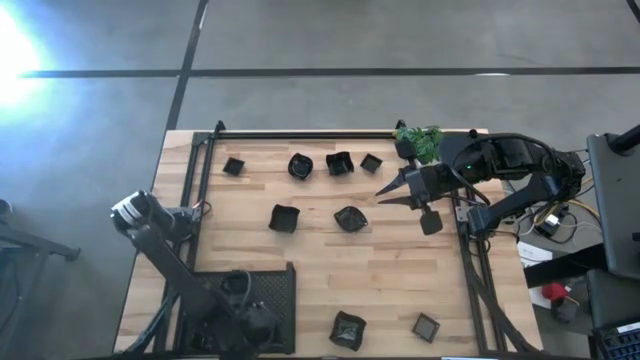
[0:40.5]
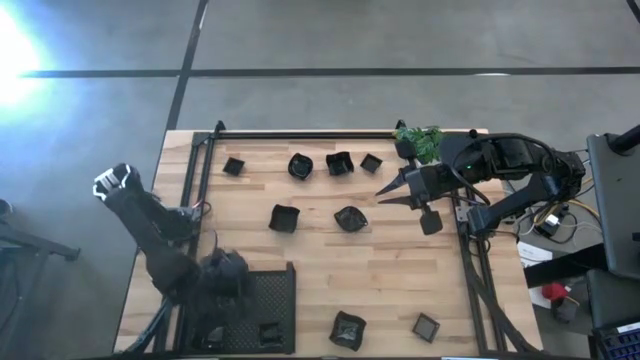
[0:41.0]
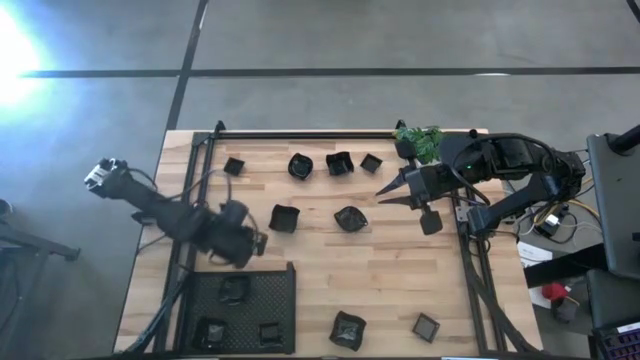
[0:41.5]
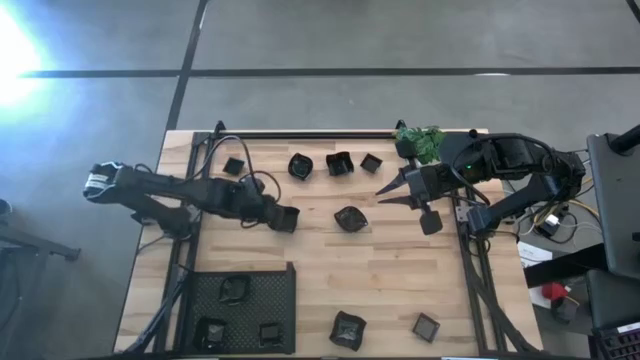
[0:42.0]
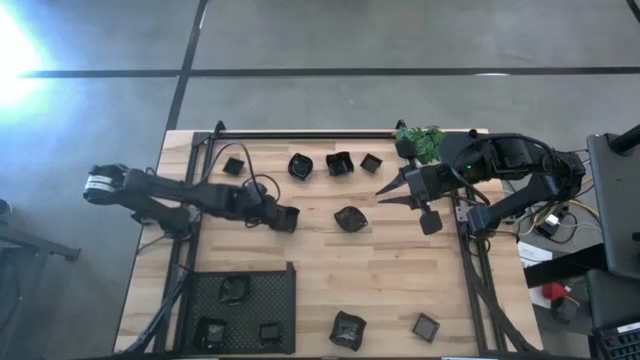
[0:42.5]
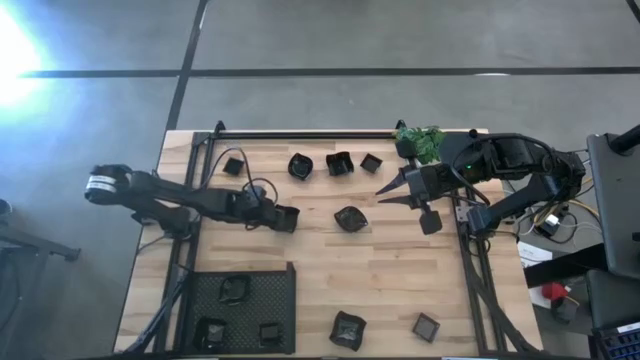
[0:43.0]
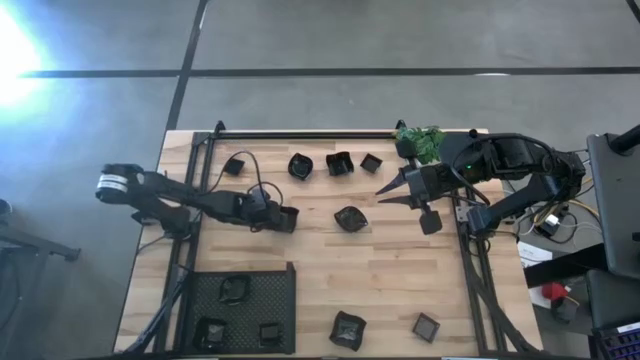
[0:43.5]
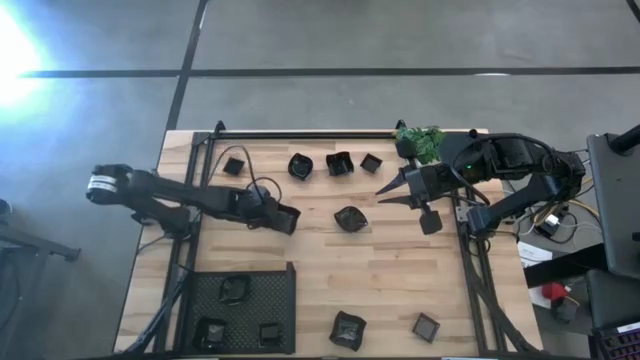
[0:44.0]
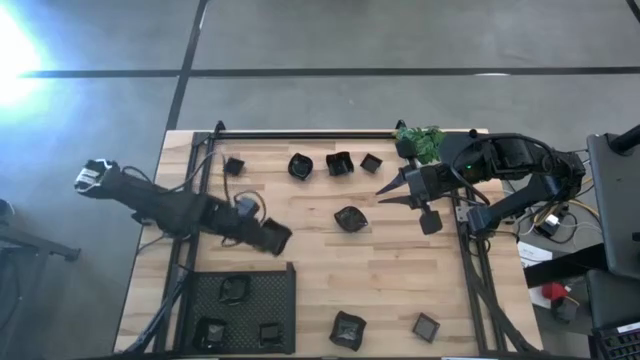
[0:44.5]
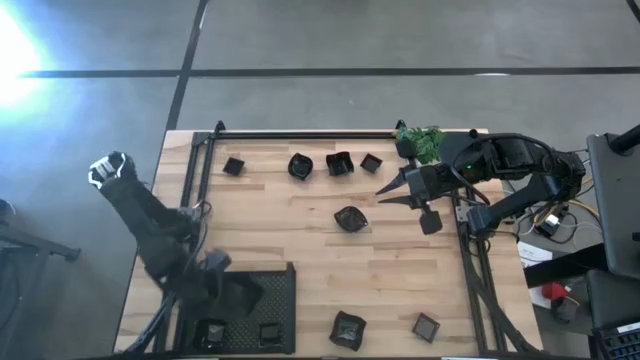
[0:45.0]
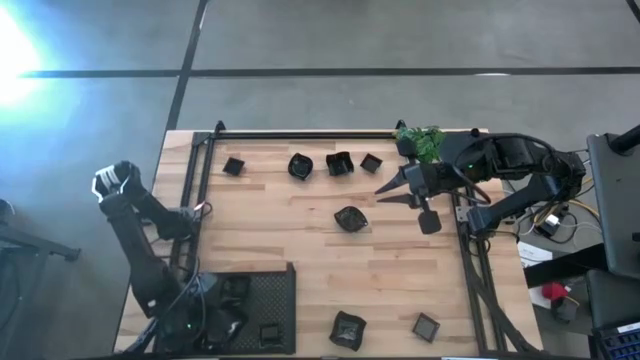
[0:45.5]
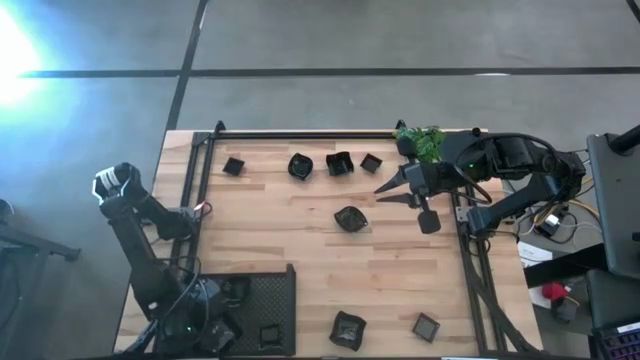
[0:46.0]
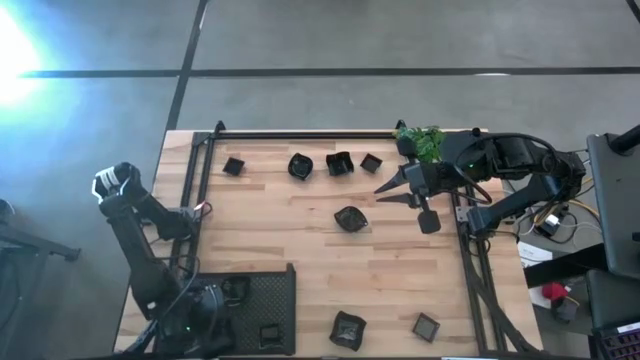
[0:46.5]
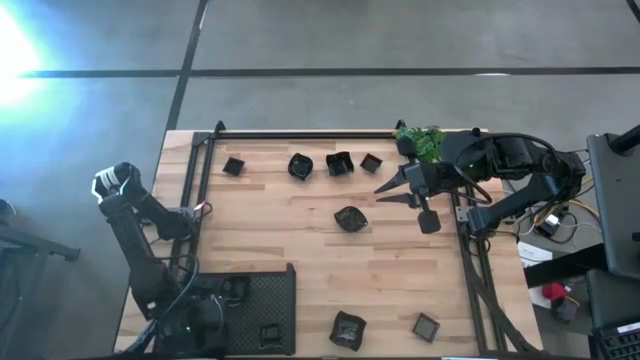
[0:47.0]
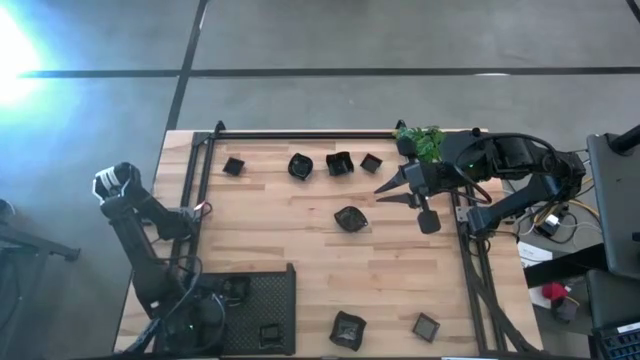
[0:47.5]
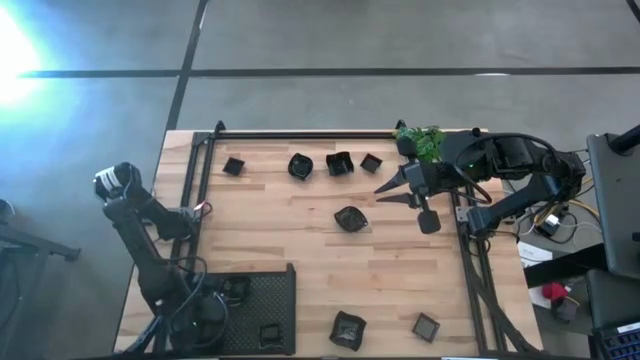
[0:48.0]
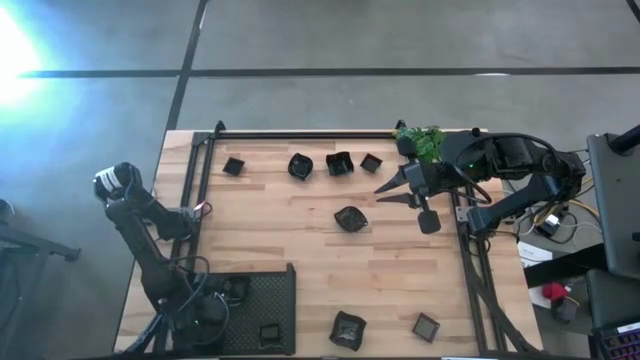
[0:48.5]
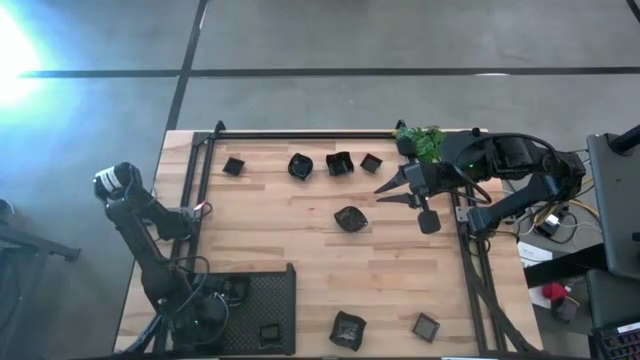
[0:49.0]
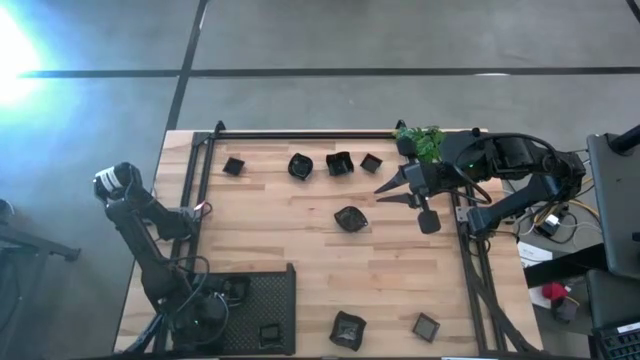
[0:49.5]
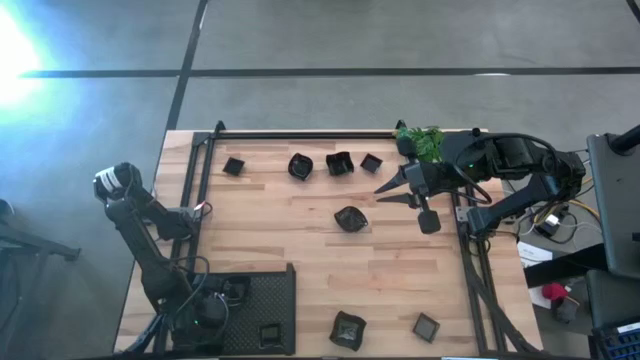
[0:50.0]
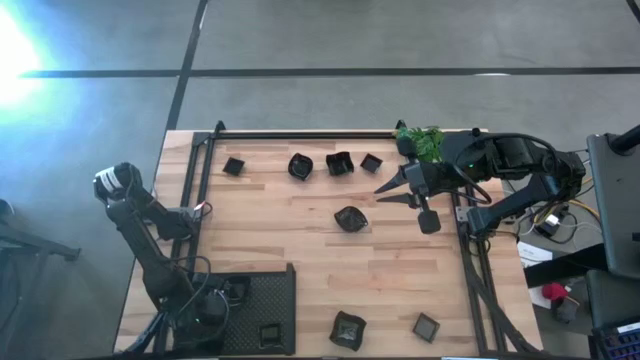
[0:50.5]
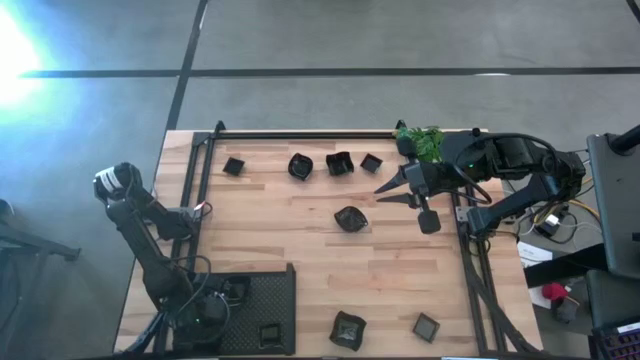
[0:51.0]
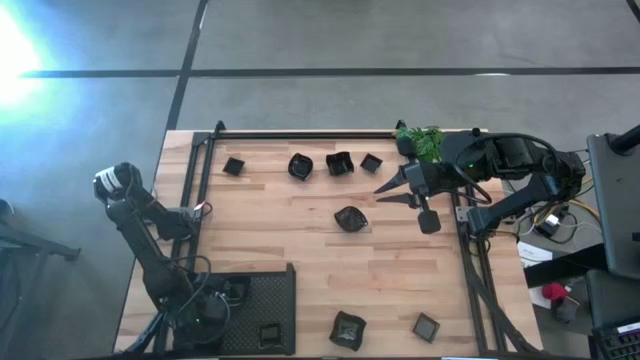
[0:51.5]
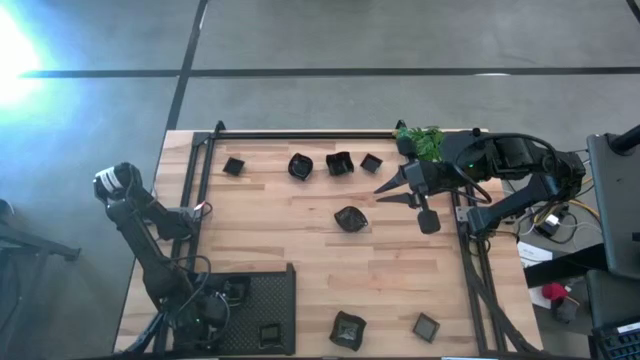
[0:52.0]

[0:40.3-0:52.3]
Task: Pick & Place Mini shaped plates
Stack the black distorted square plate on the black distorted square plate on the shelf

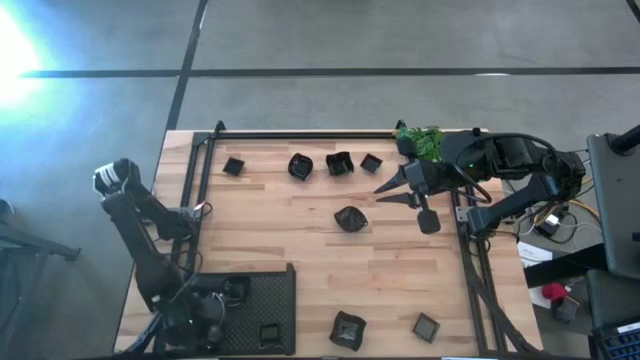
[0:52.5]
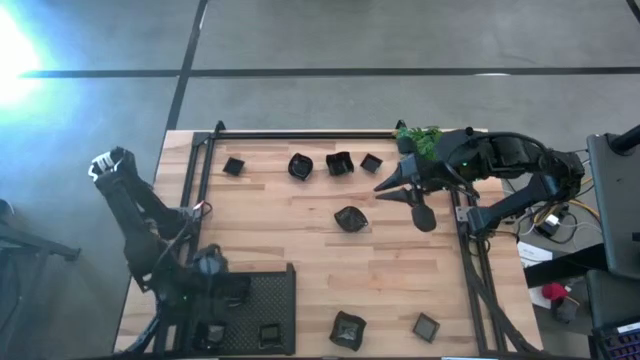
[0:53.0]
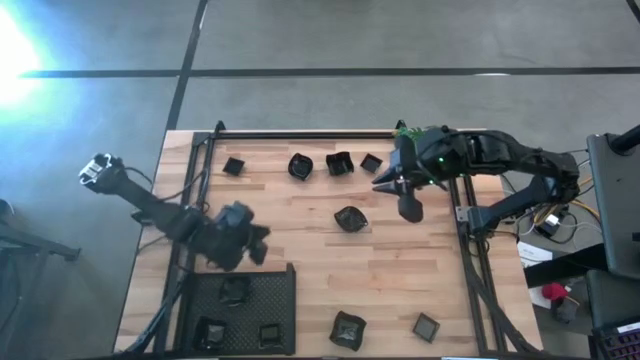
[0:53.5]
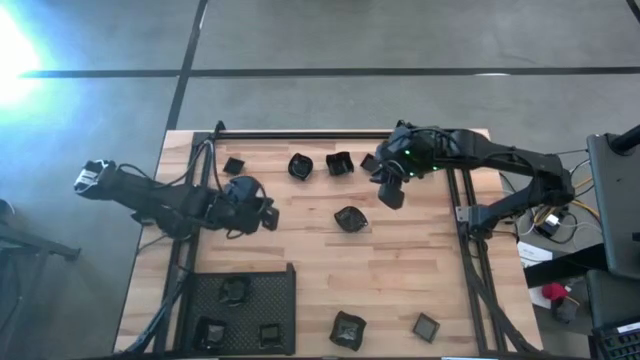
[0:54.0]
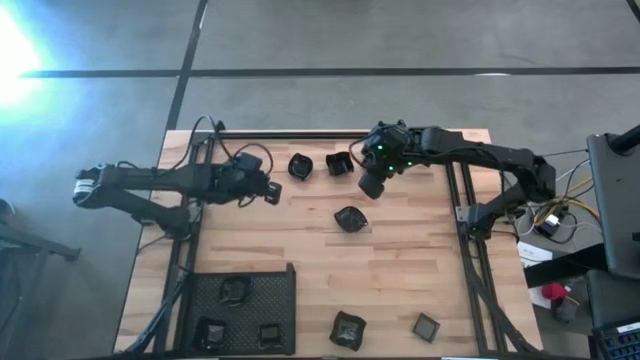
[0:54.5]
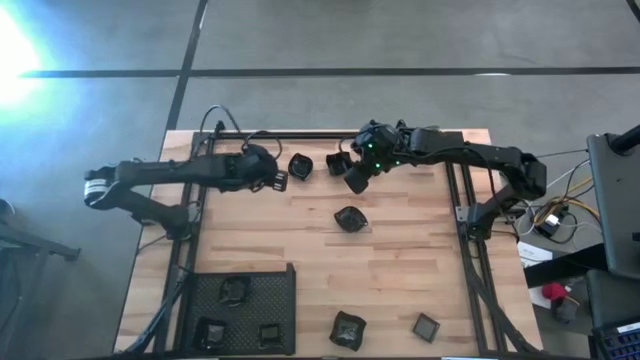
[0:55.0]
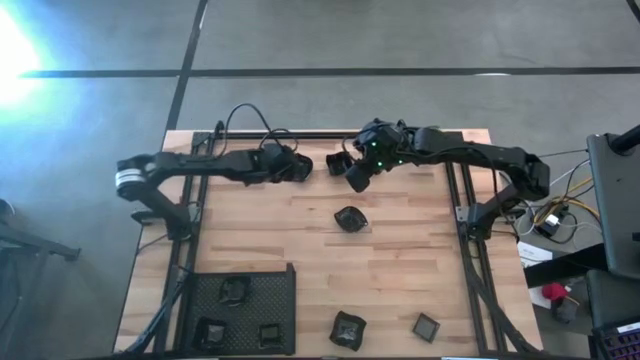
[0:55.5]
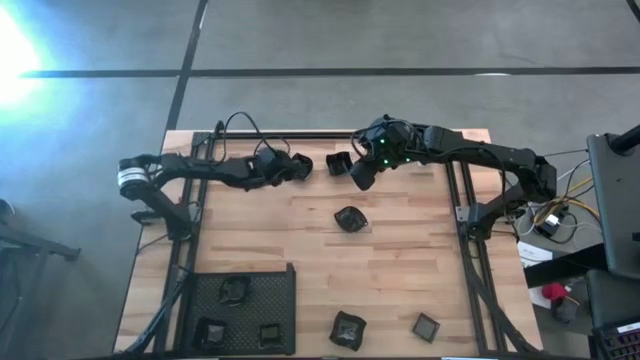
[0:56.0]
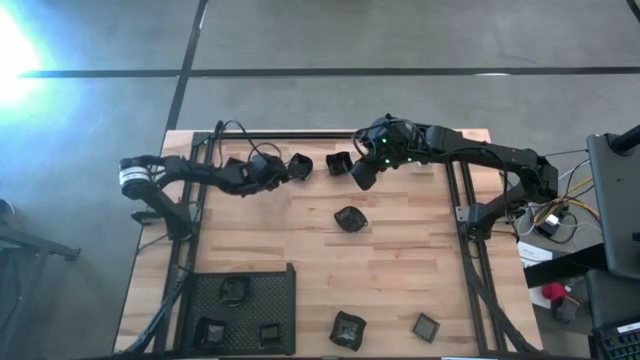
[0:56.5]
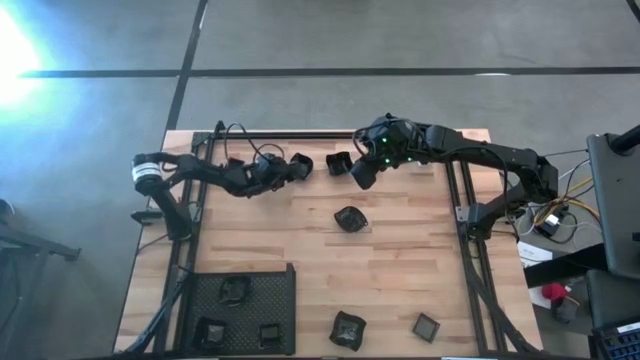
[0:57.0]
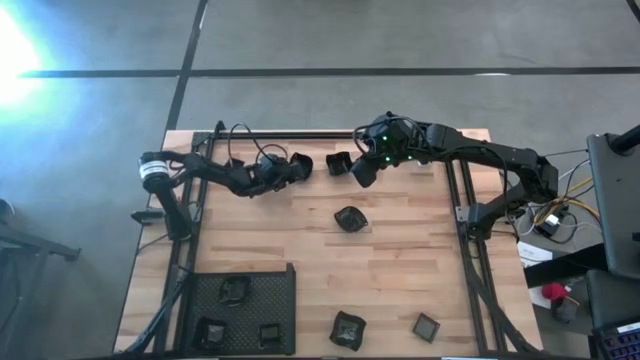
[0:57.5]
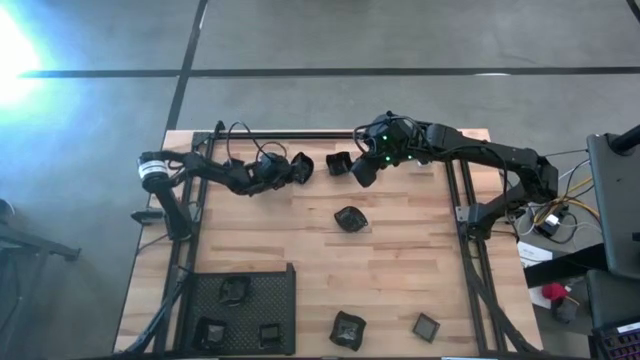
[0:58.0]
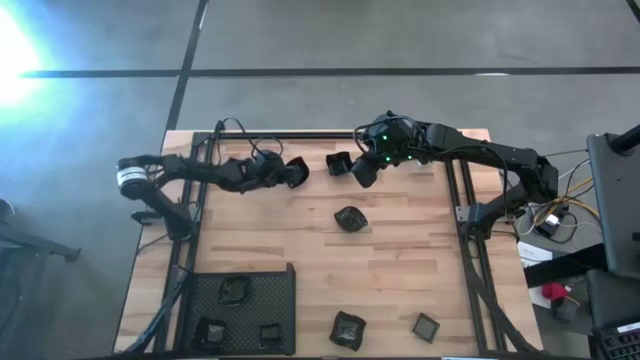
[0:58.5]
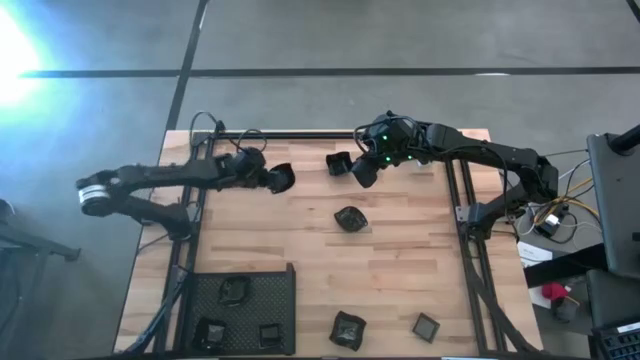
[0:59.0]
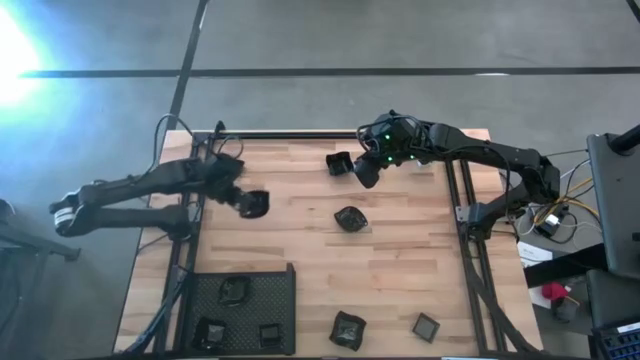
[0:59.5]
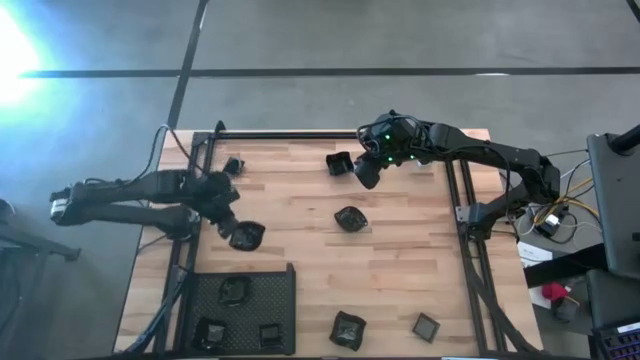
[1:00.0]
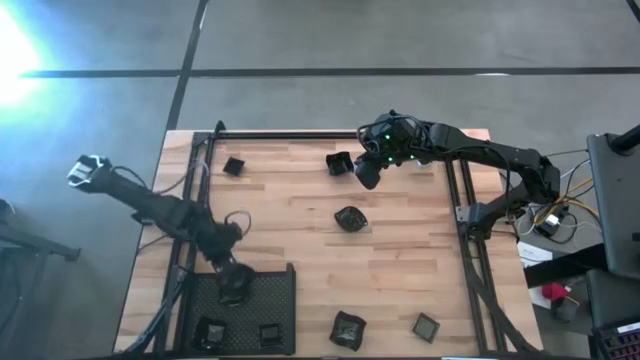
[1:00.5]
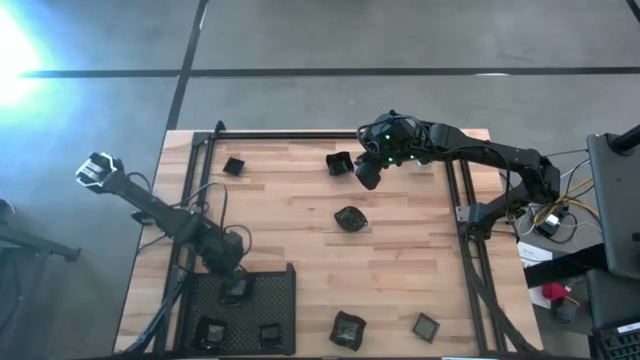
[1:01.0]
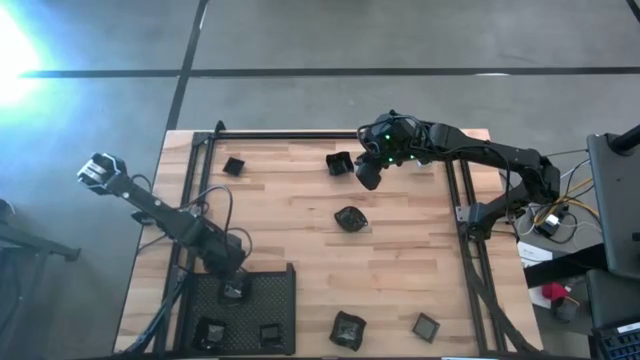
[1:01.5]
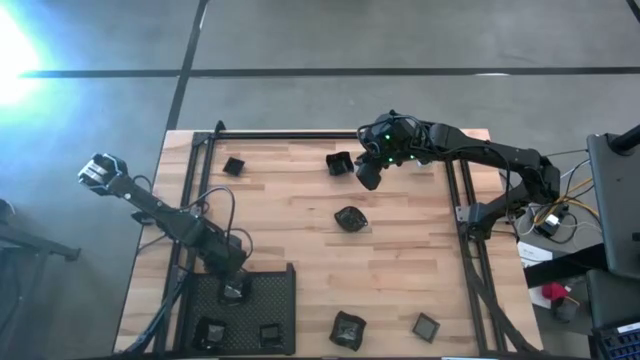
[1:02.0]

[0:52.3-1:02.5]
Stack the black leaf-shaped plate on the black leaf-shaped plate on the shelf
